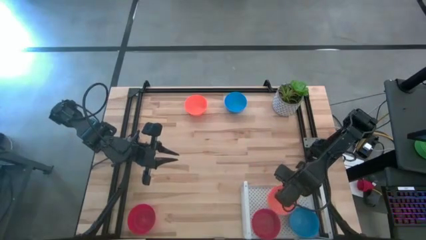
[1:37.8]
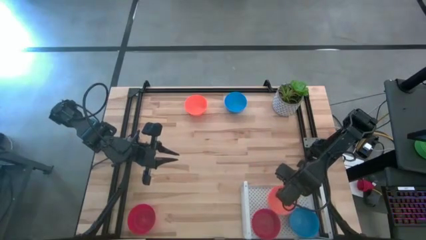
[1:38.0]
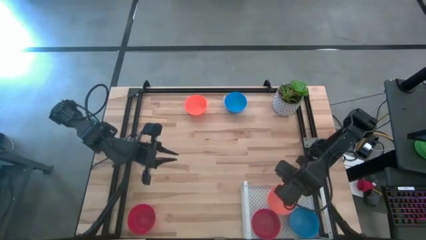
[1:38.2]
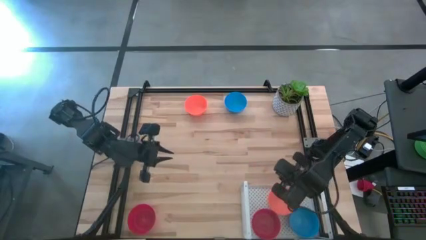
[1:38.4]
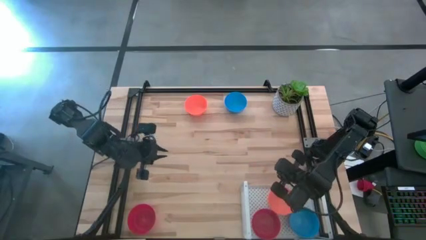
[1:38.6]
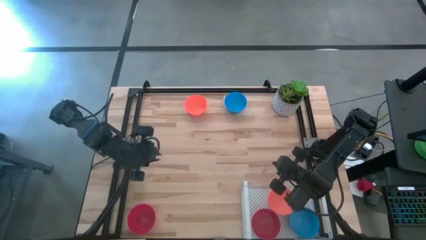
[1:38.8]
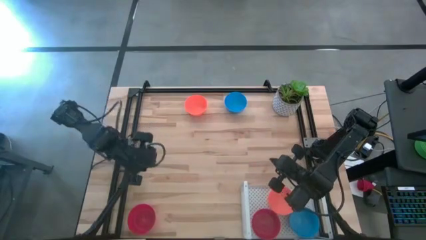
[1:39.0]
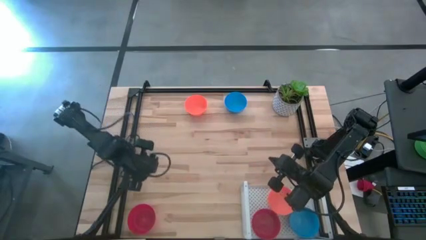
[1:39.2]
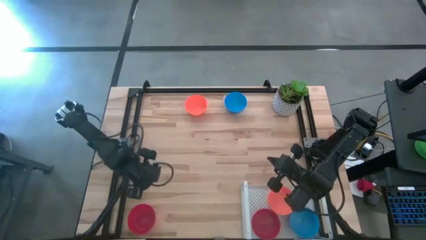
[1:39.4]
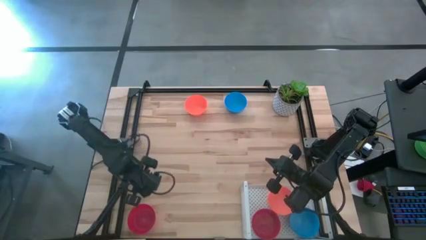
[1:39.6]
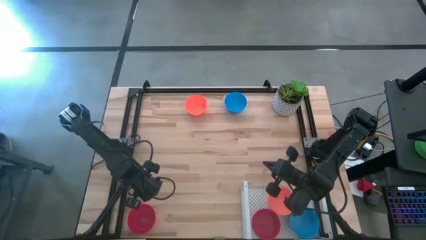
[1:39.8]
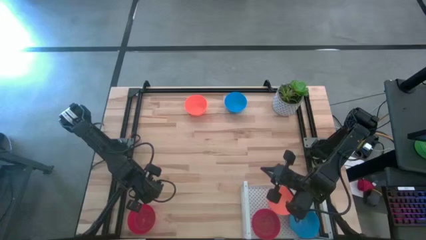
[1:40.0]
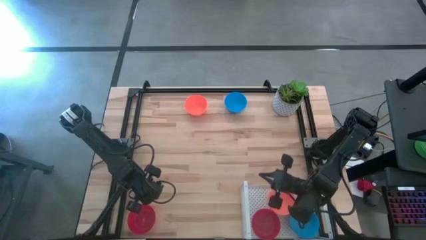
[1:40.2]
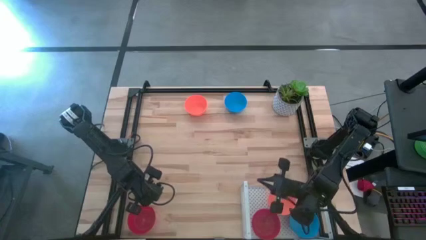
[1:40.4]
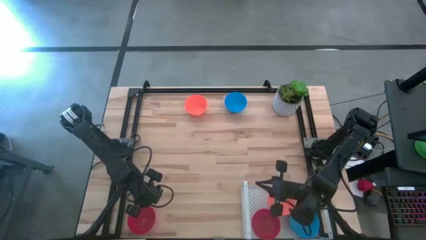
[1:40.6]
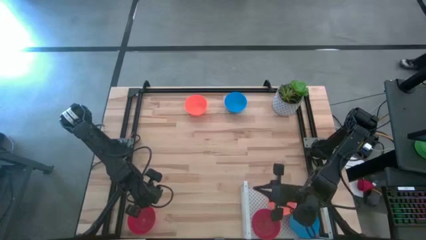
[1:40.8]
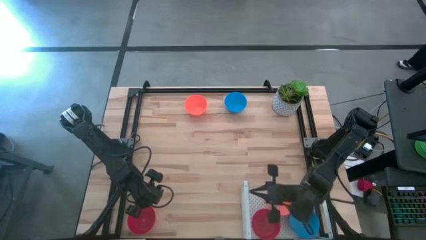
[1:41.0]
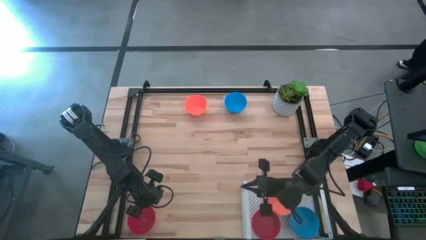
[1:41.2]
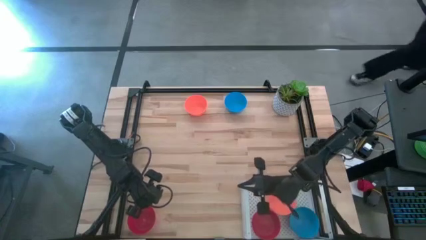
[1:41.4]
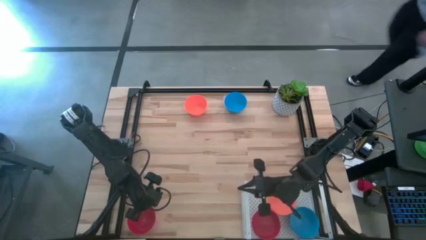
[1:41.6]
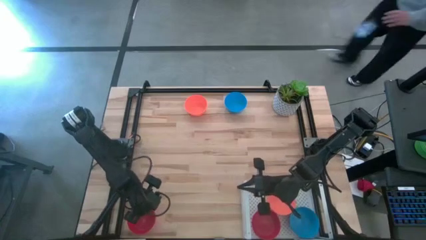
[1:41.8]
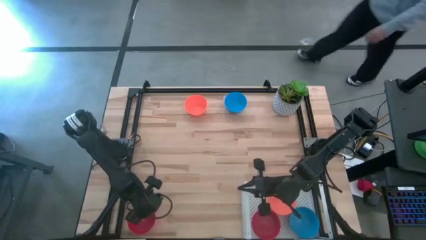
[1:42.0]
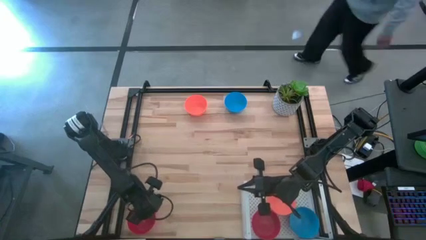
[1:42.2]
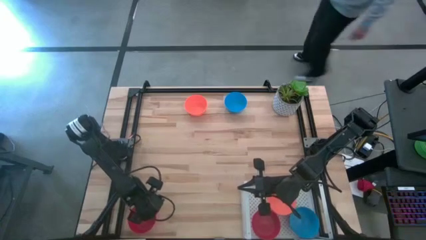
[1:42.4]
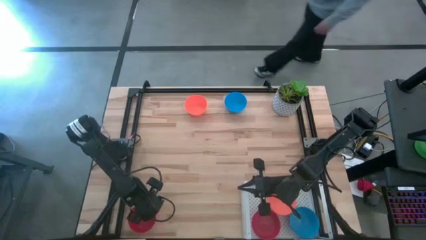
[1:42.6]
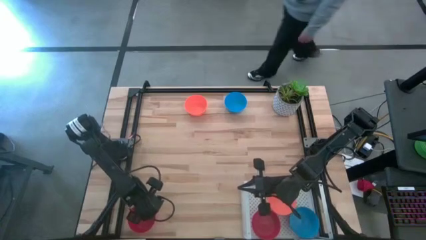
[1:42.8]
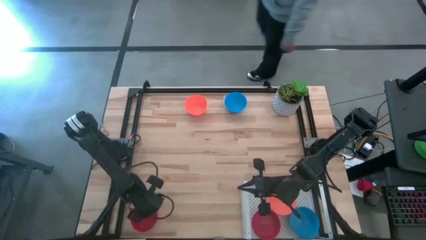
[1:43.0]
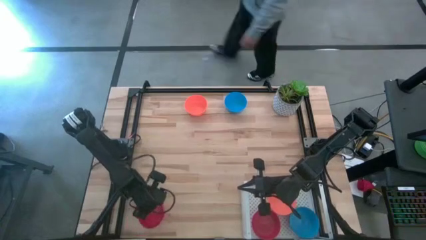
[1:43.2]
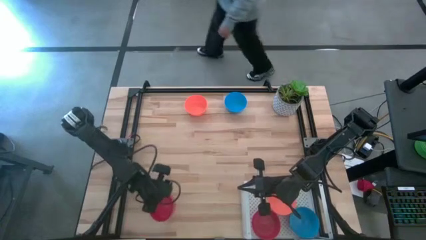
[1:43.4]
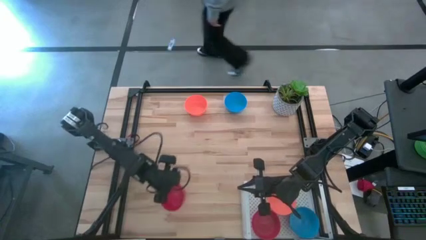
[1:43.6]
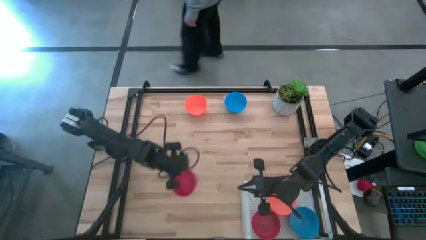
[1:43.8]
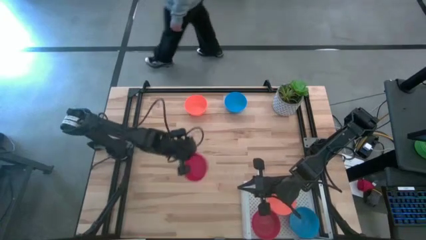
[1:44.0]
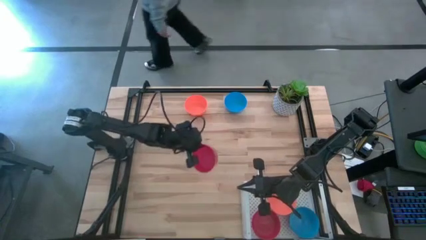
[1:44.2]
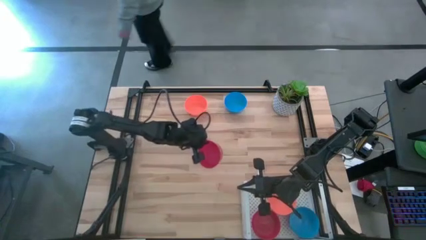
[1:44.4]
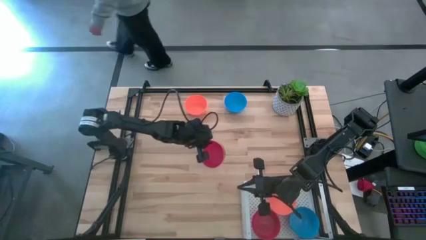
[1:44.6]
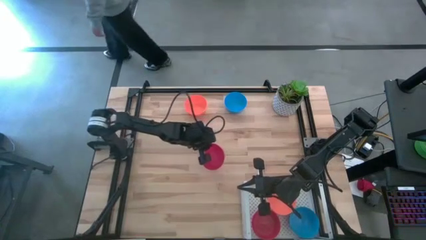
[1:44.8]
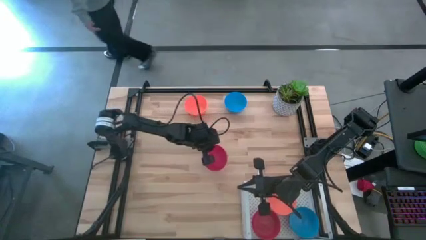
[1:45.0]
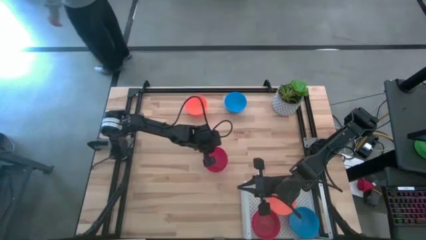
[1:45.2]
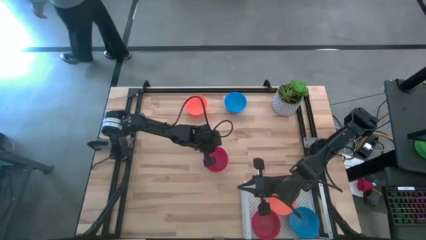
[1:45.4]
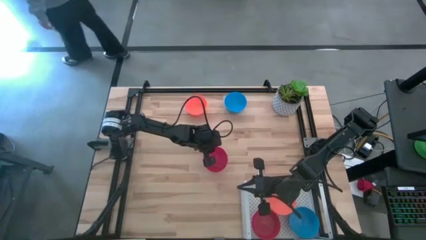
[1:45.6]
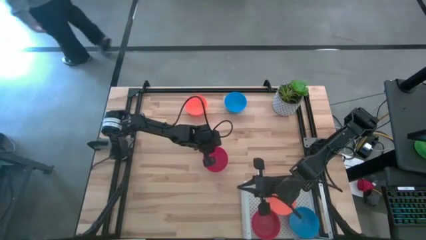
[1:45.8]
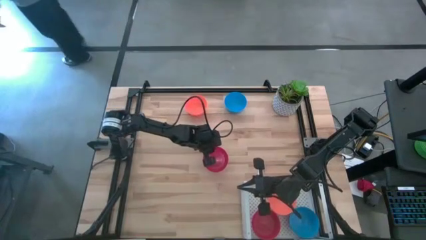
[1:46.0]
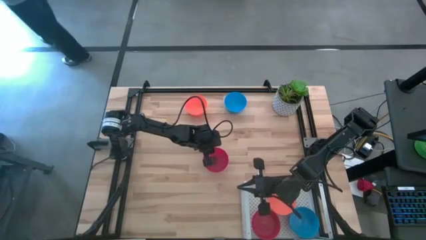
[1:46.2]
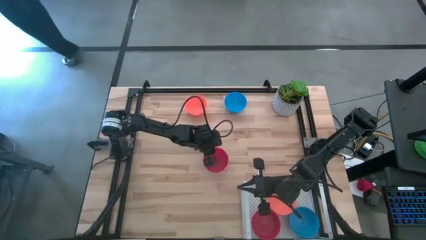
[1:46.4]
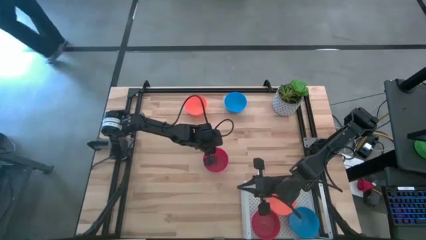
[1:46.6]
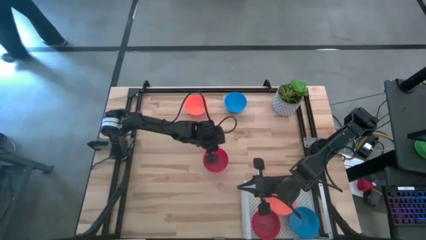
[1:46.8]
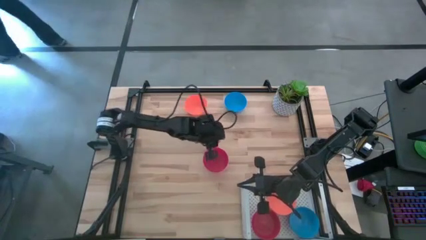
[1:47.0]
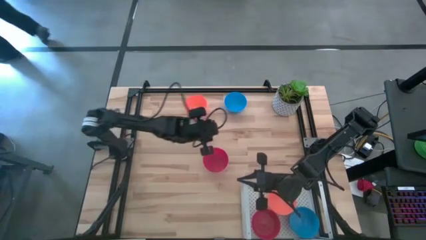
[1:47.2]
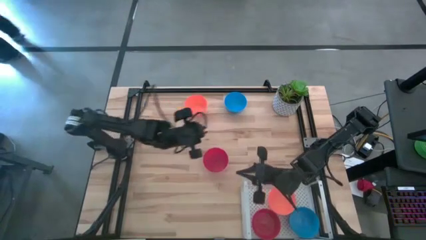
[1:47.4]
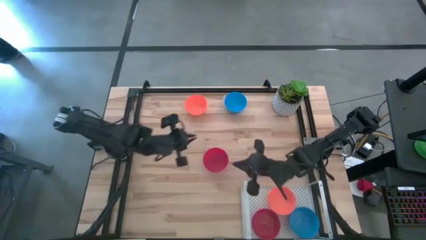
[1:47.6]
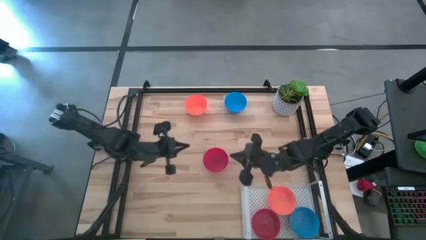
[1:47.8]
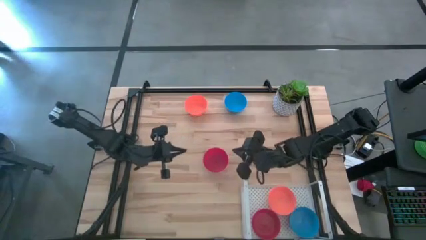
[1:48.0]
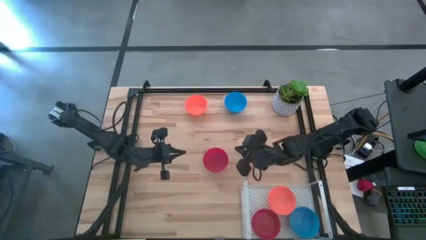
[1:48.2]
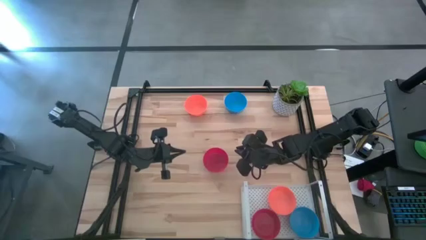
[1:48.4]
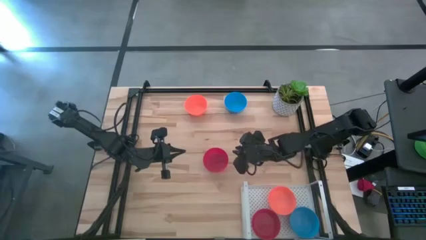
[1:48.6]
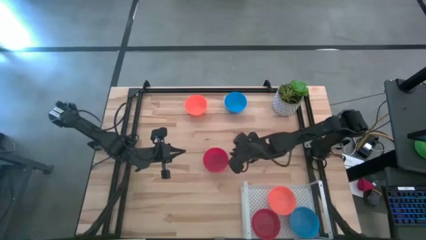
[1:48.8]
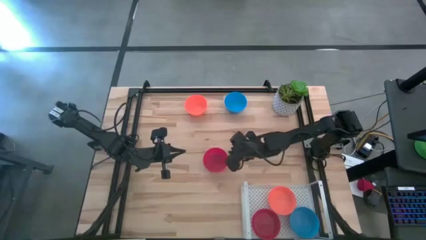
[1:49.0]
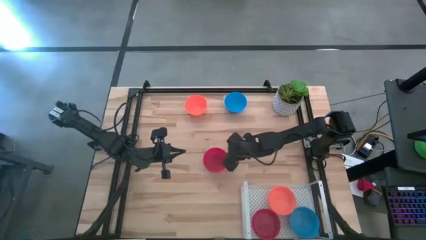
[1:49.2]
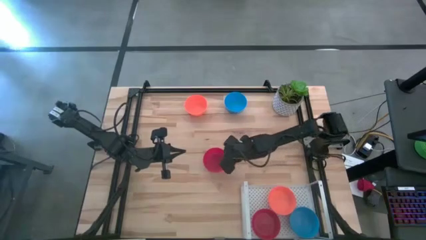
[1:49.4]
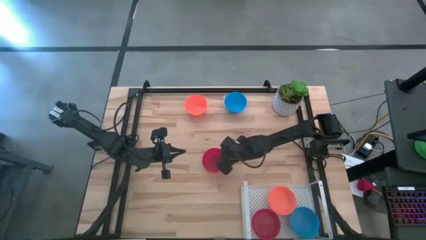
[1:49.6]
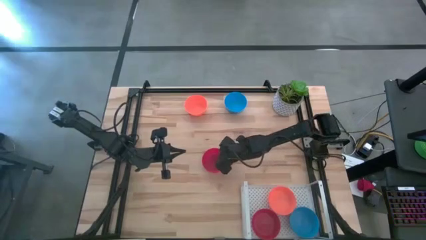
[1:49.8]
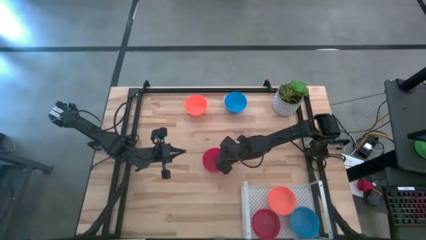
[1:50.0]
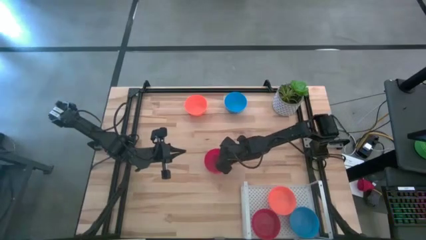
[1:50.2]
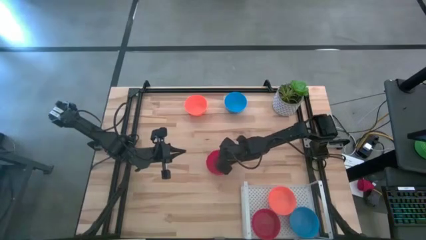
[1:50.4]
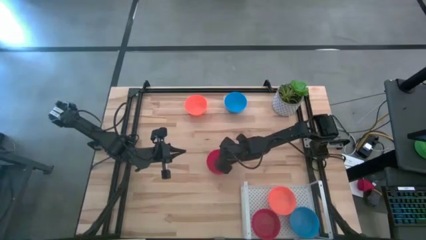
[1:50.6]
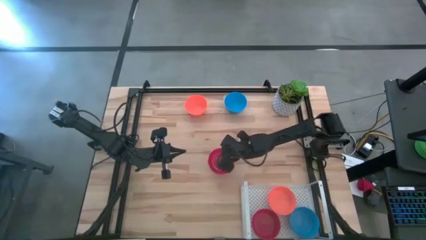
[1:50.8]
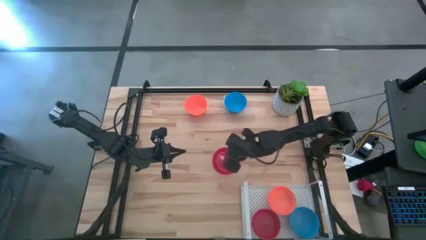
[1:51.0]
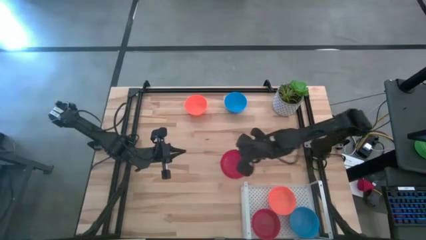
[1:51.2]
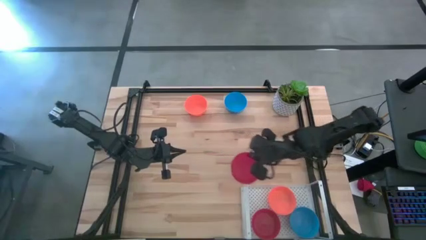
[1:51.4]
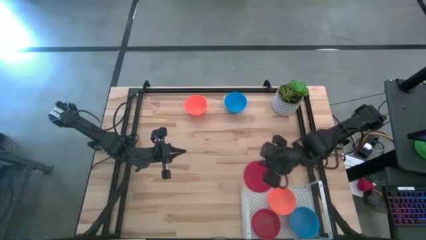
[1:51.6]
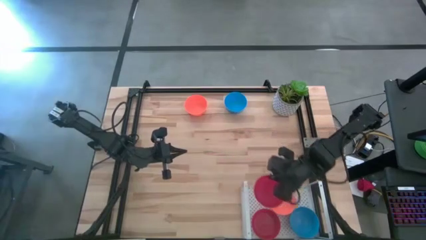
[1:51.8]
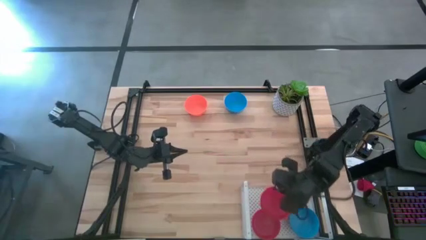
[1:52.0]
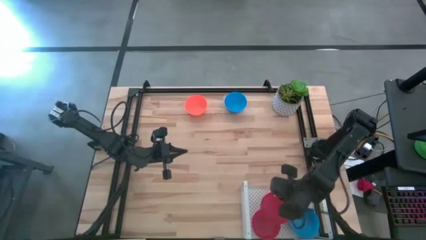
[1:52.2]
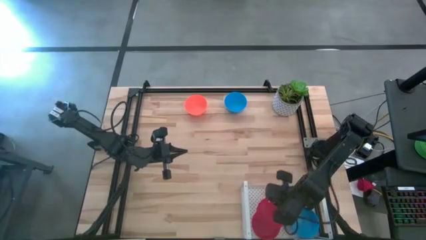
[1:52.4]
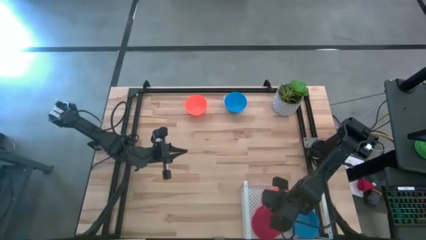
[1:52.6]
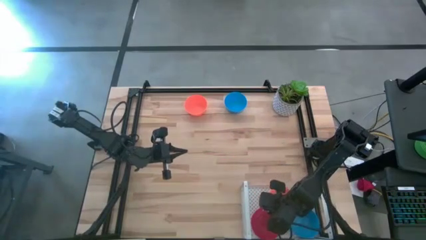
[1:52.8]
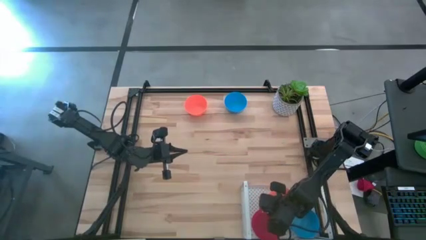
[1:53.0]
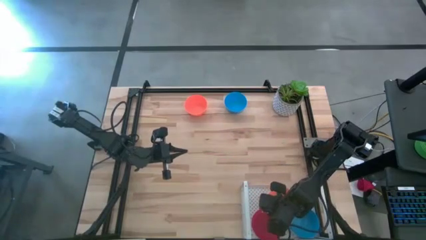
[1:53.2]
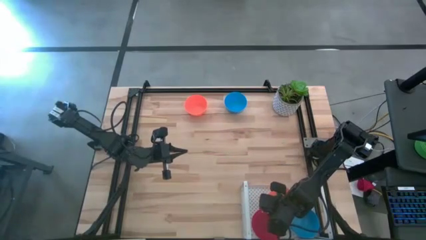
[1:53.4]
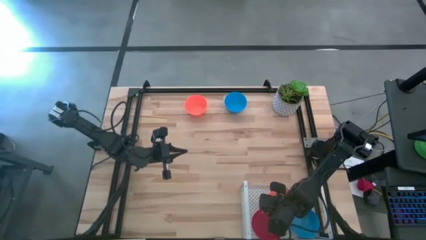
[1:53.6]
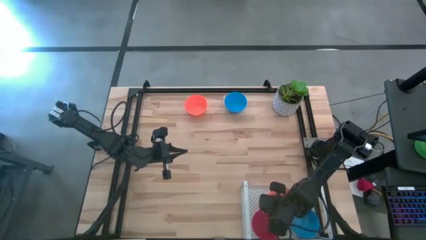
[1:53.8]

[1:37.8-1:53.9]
Task: Pick & Place Mini bowls
Stack the red bowl on top of the red bowl on the shelf

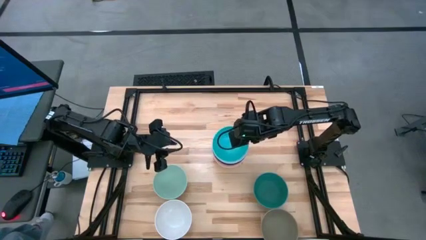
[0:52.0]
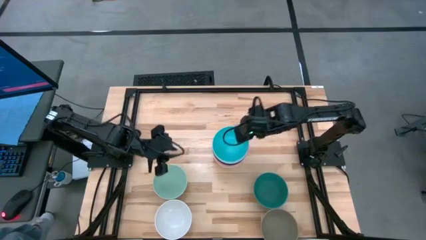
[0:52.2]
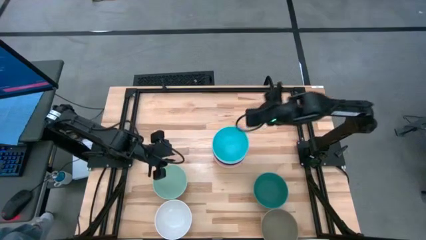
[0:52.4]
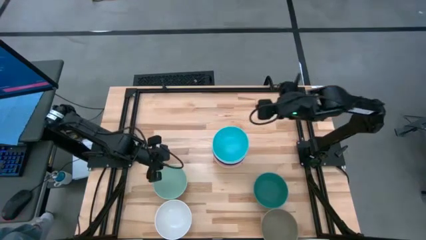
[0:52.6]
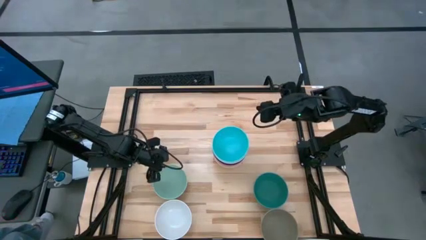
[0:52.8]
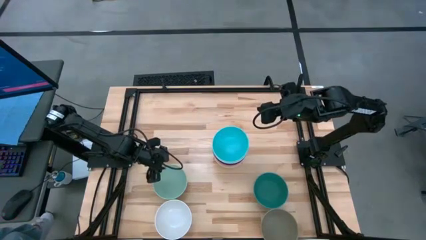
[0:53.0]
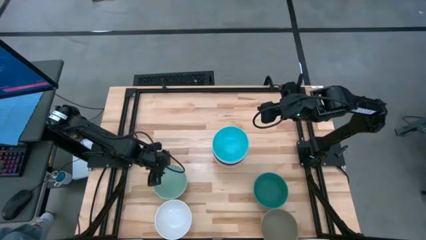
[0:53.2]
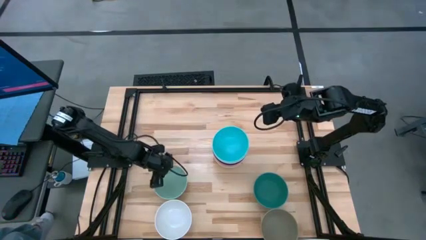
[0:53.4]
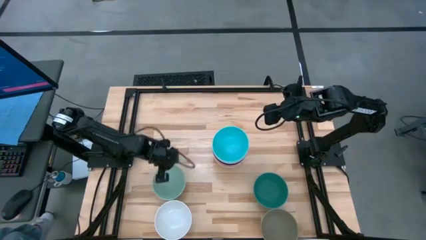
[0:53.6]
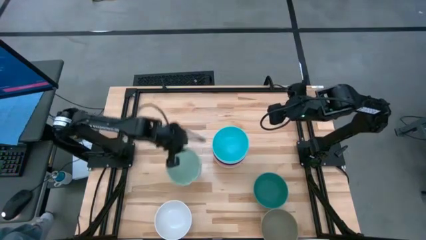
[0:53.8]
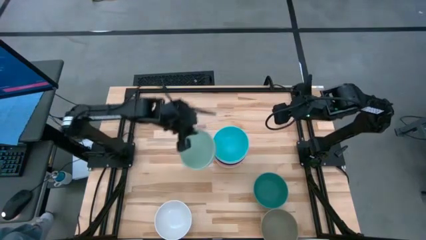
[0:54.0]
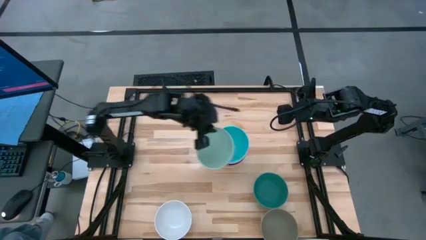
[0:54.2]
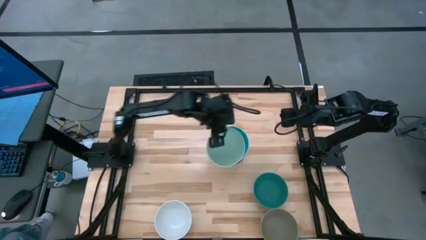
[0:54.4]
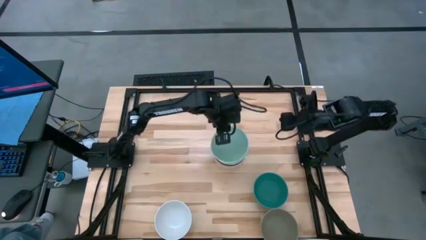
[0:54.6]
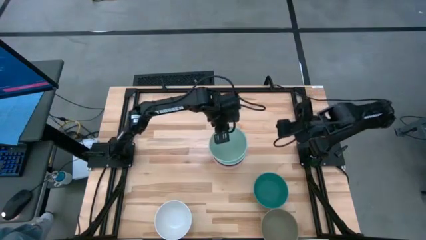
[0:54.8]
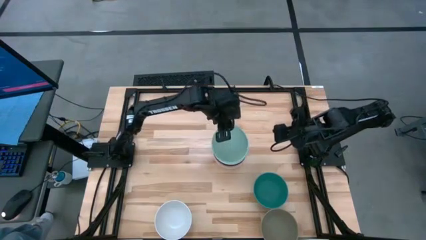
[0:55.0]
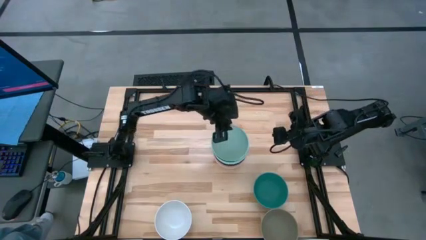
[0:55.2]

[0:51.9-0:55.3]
Task: Nest bowls inside each other
Stack the light green bowl on the light blue bowl
